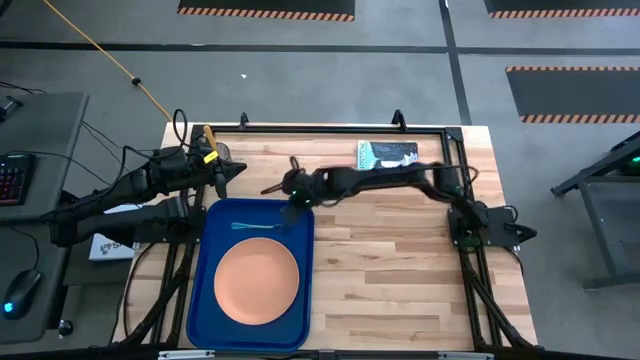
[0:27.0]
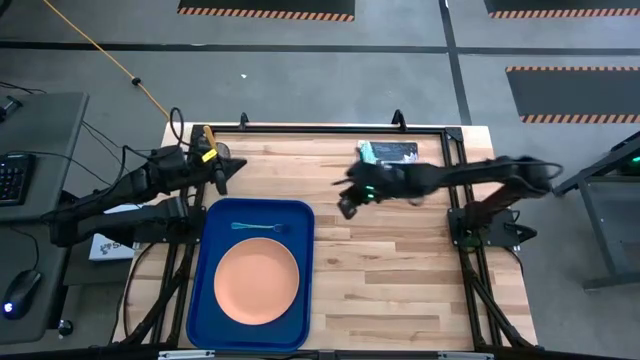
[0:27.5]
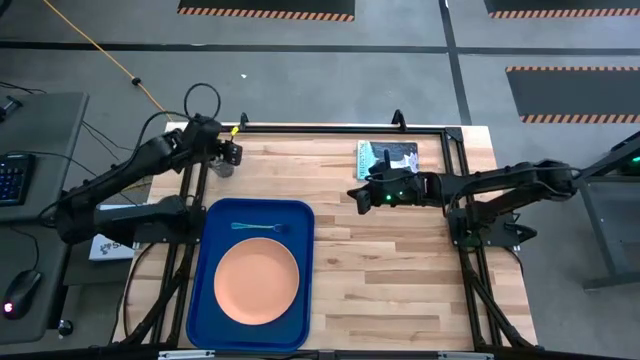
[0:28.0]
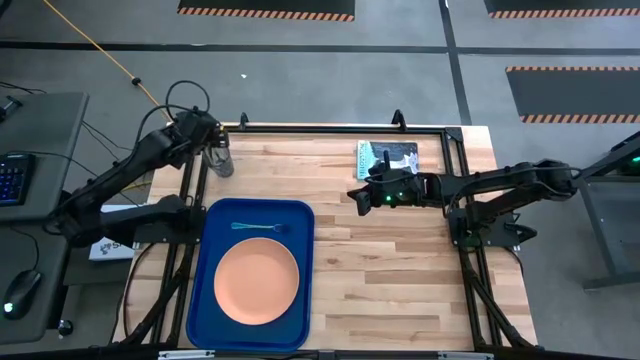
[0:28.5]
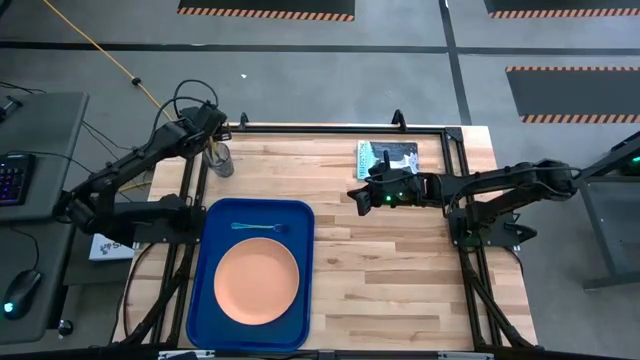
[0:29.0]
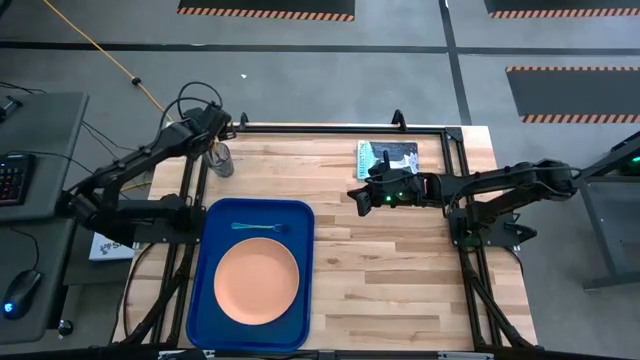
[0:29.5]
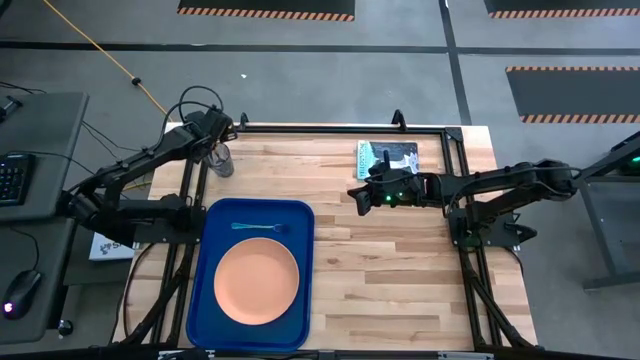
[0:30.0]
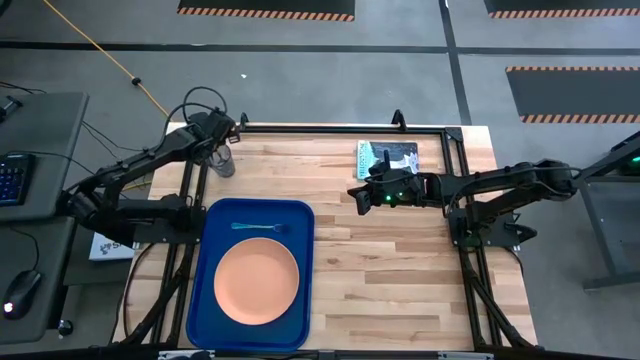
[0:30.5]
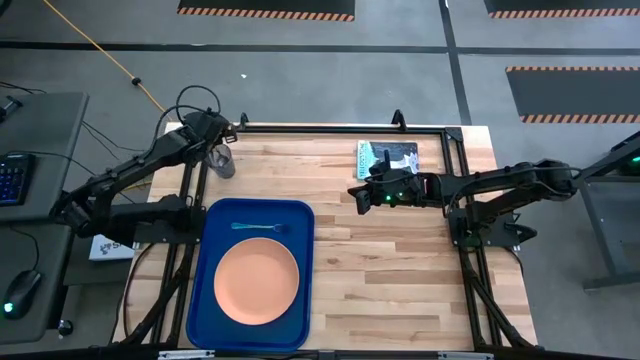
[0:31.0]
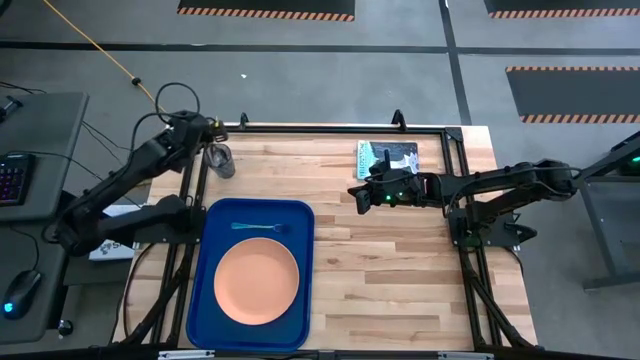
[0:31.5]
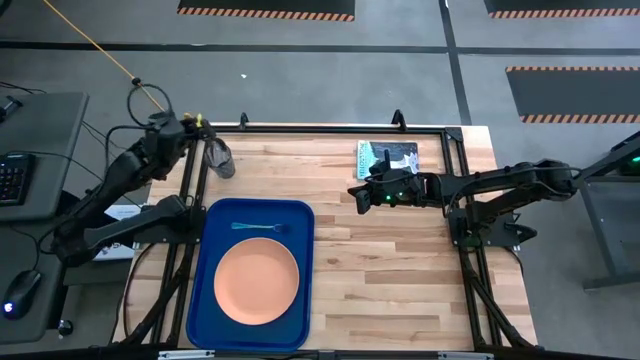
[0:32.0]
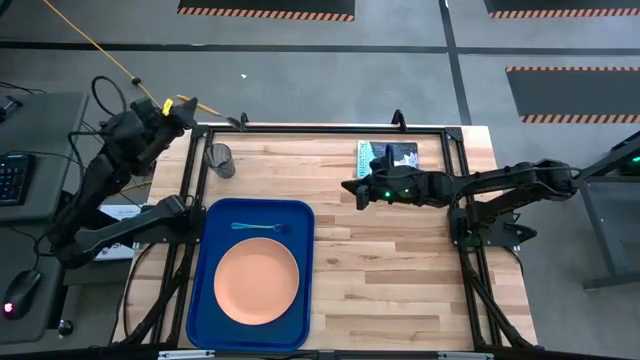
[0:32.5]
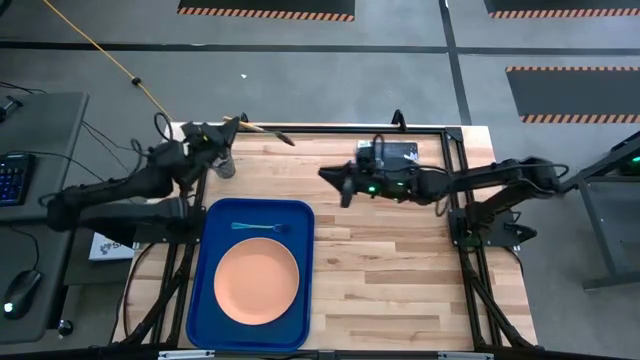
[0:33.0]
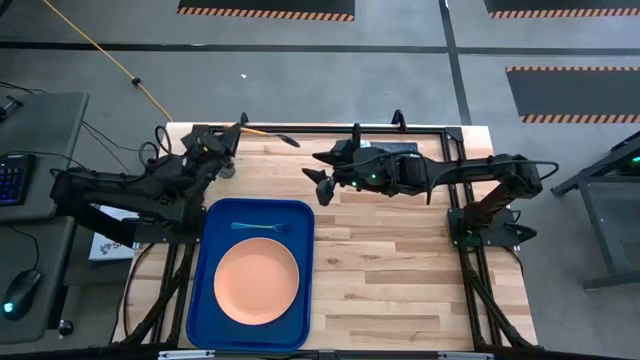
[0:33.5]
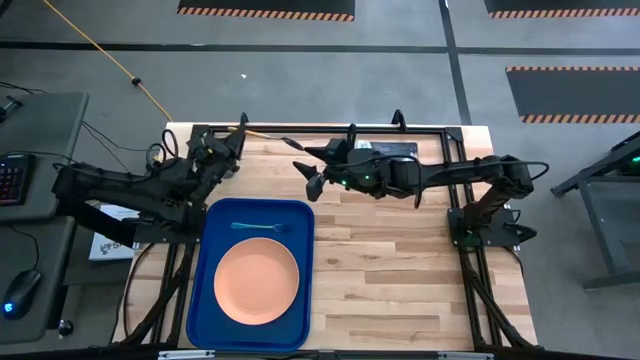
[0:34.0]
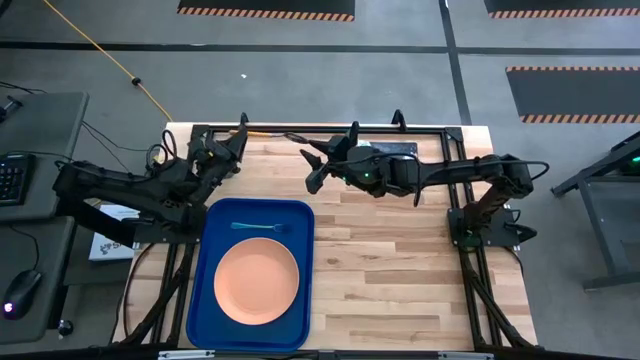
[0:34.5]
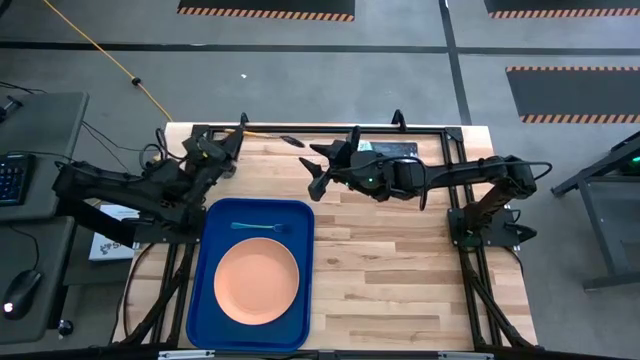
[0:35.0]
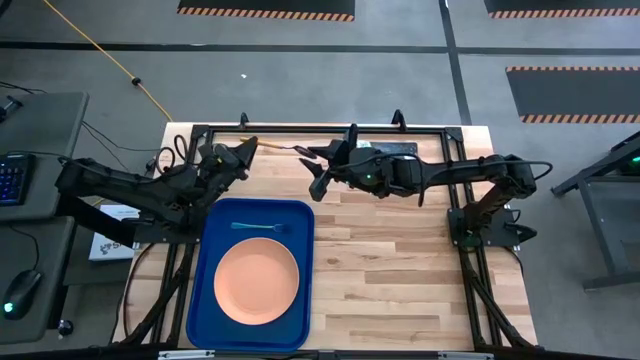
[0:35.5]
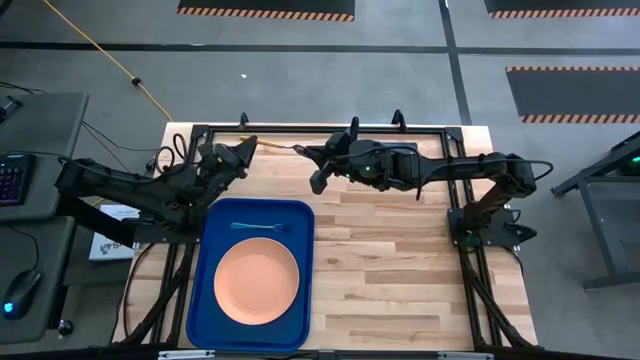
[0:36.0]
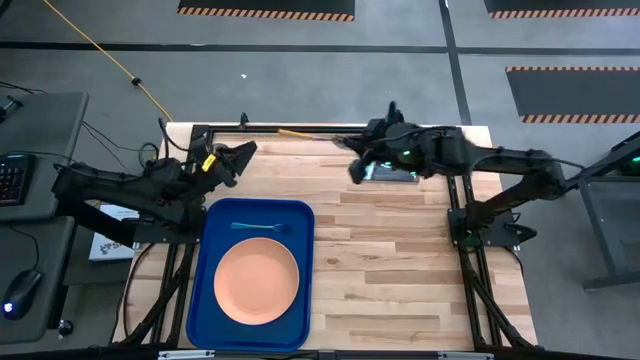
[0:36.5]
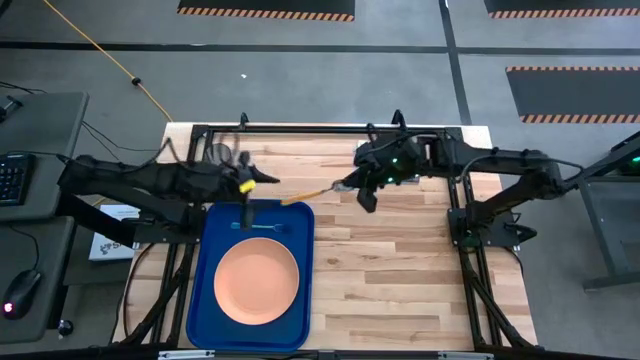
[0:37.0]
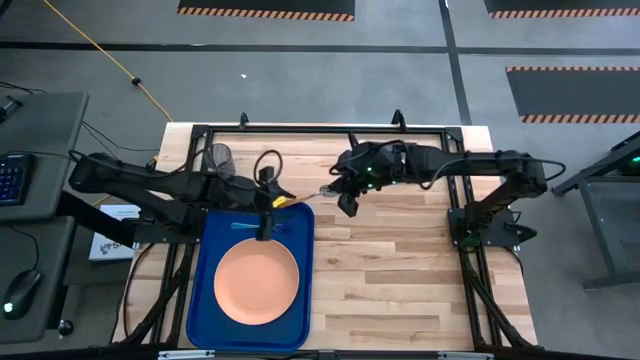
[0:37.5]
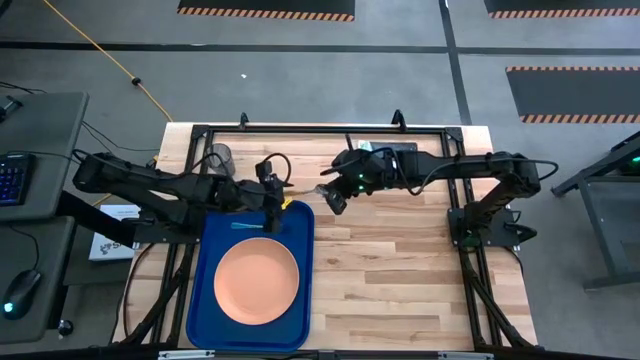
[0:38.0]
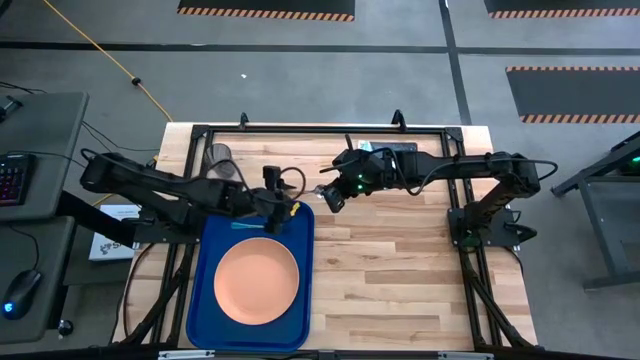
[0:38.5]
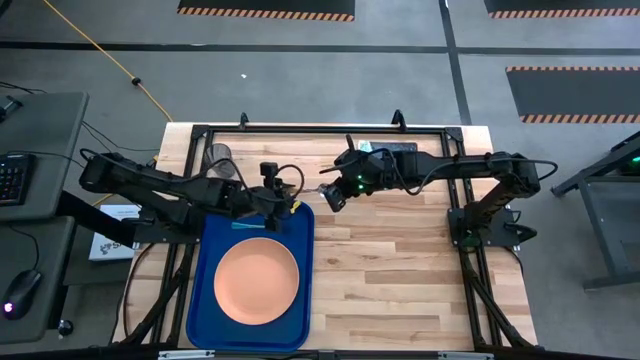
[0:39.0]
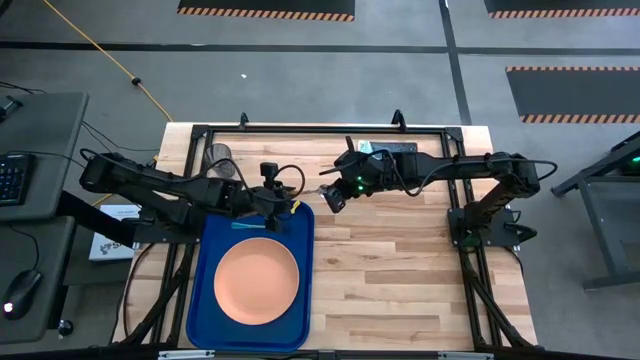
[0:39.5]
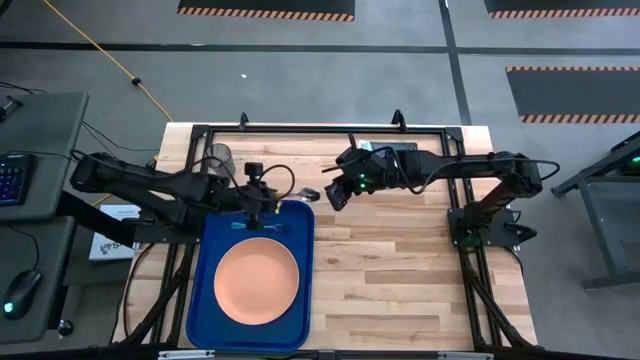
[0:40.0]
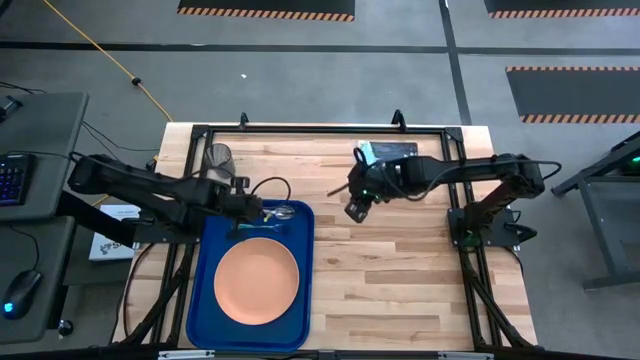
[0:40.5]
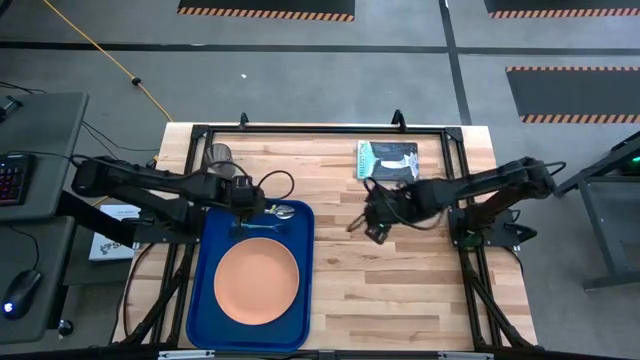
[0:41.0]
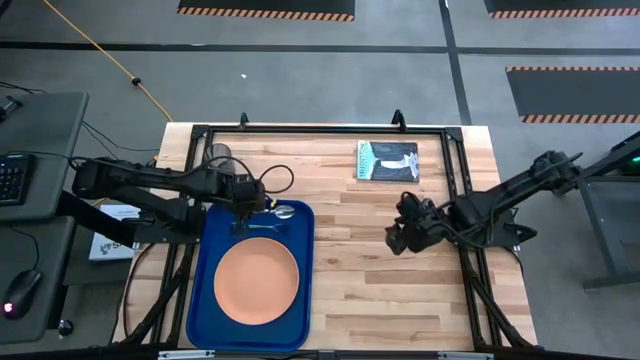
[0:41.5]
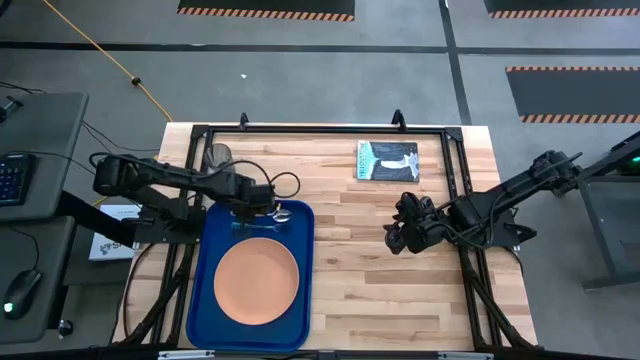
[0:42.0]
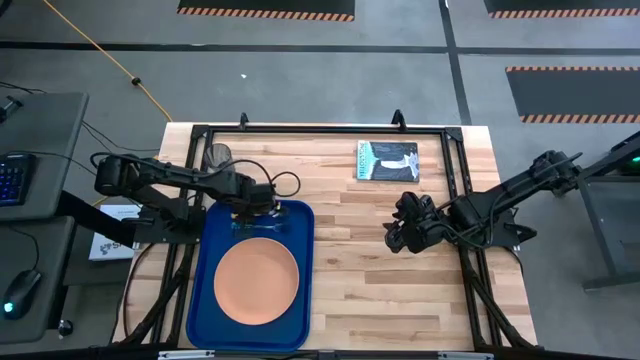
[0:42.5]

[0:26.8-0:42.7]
Task: Pick and place plate/cup/fork/spoon on tray
Put the yellow spoon on the blue tray to the left of the blue fork

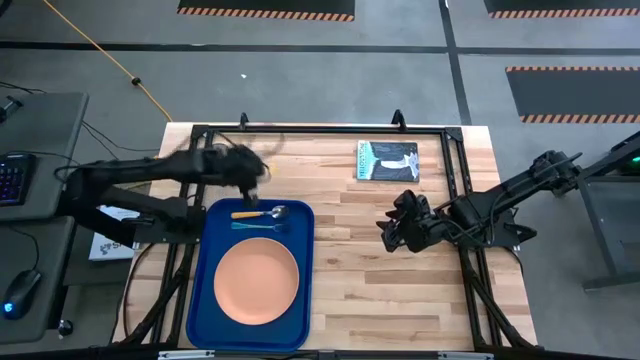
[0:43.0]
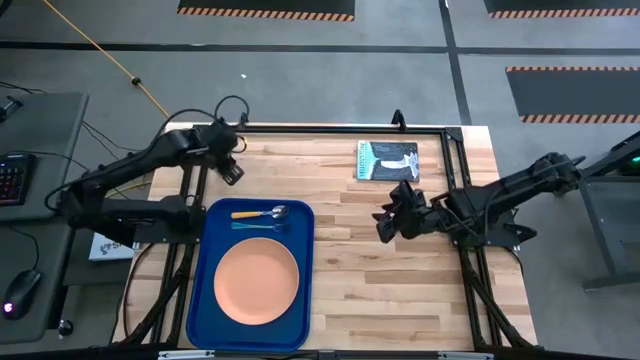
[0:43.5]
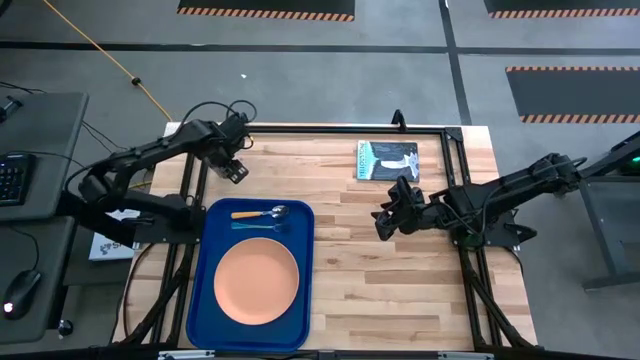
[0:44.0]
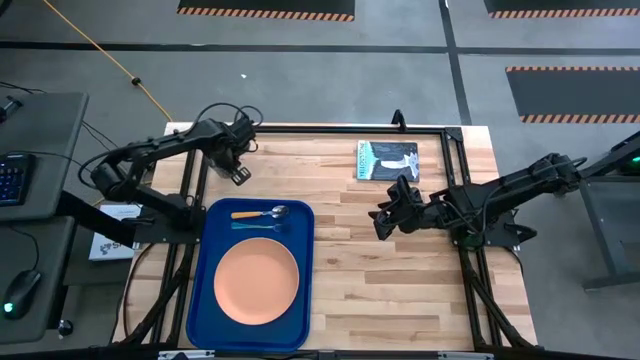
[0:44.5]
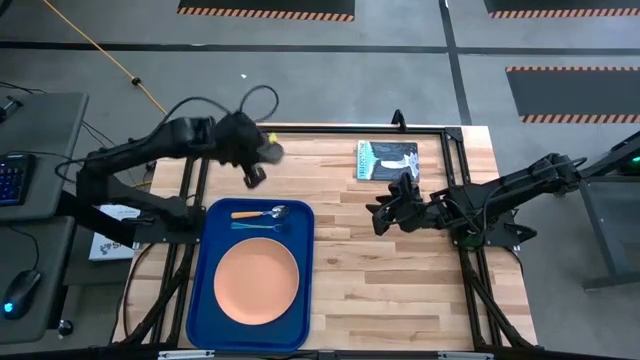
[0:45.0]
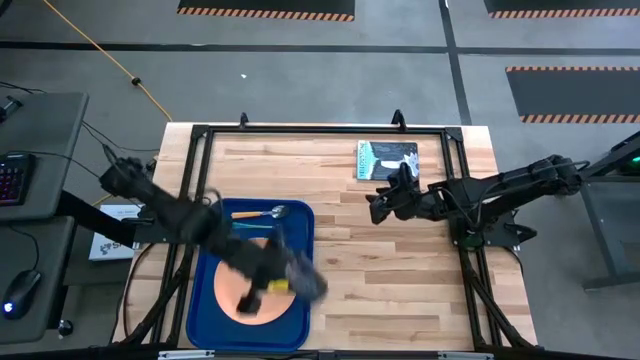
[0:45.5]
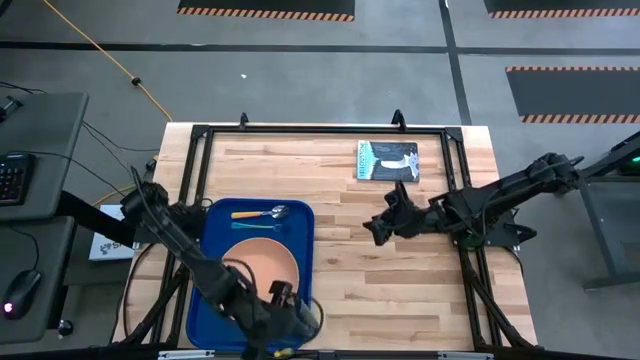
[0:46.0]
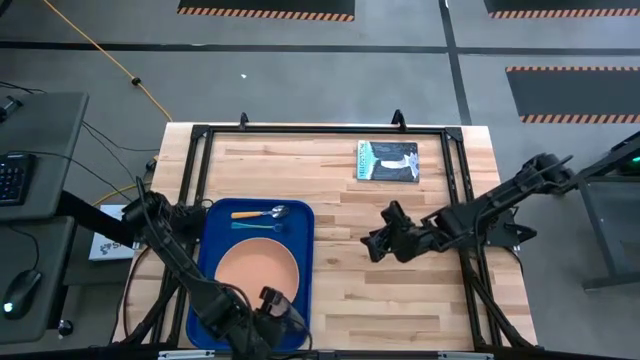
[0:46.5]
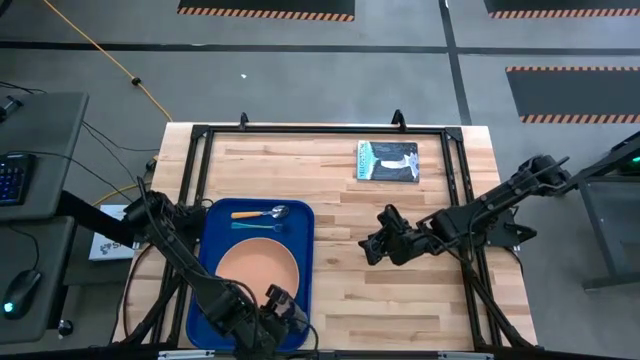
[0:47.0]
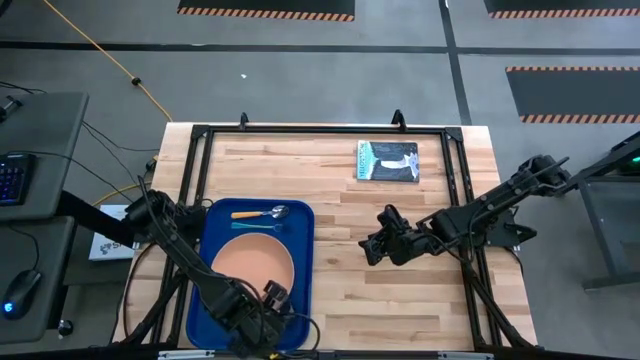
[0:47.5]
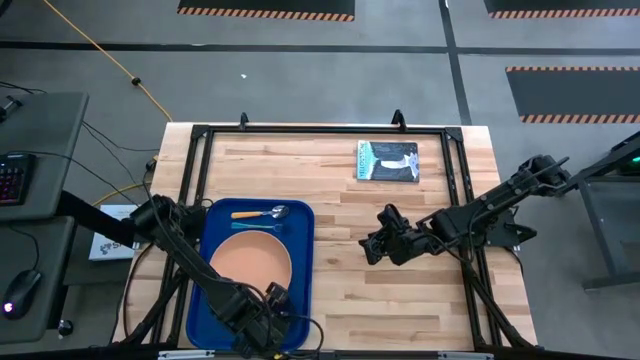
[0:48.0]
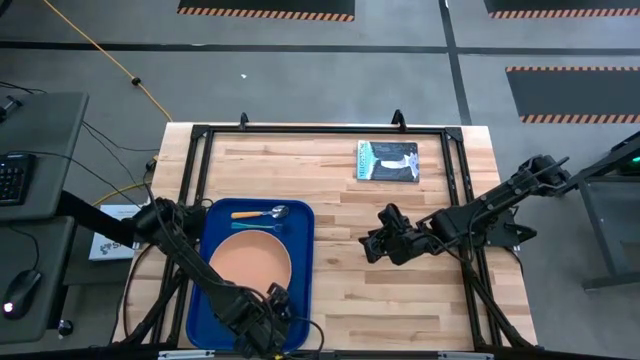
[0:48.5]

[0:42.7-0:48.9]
Put the black cup on the blue tray
